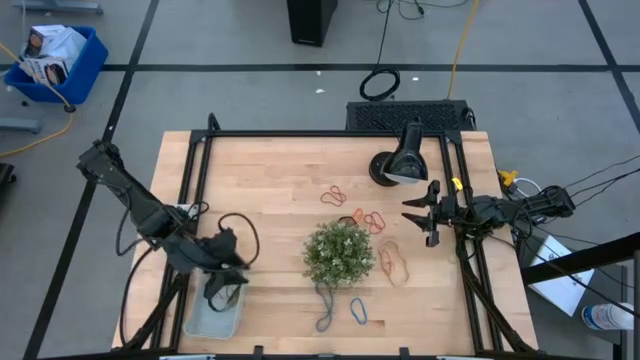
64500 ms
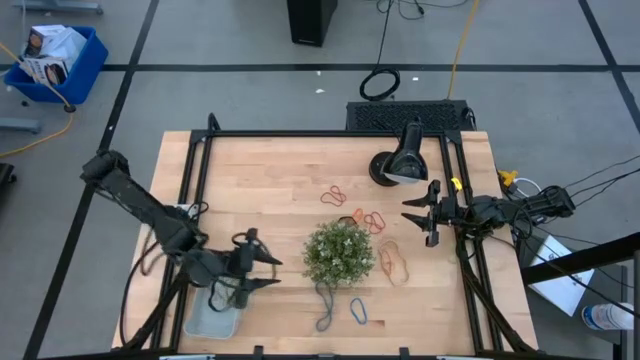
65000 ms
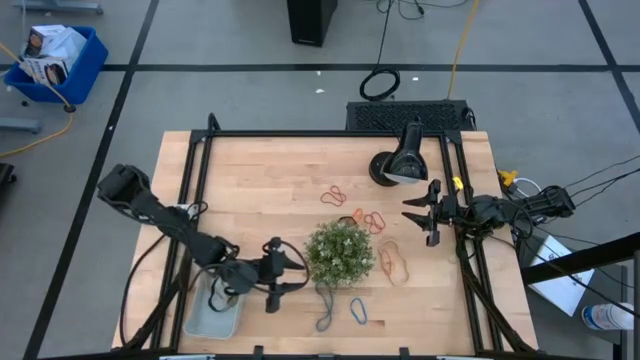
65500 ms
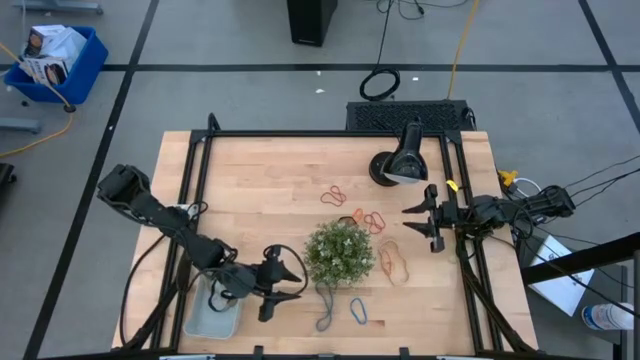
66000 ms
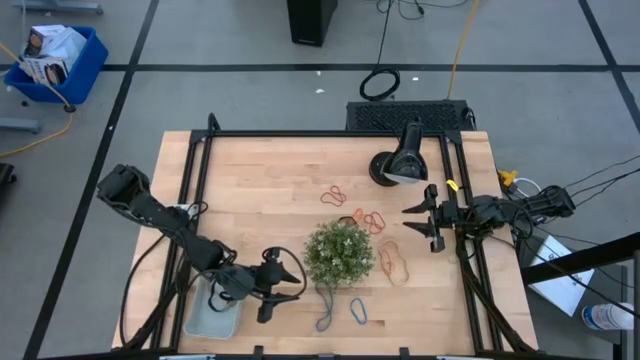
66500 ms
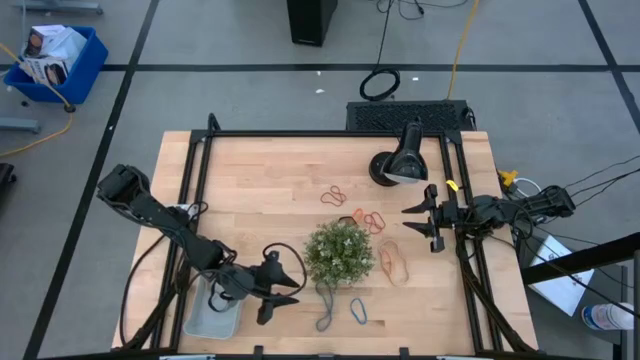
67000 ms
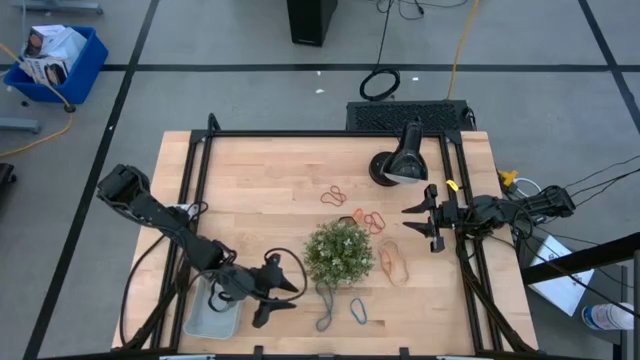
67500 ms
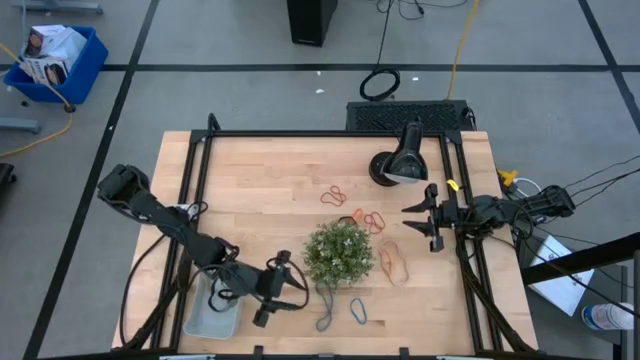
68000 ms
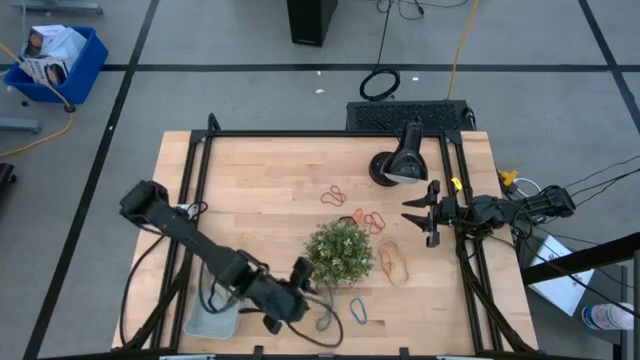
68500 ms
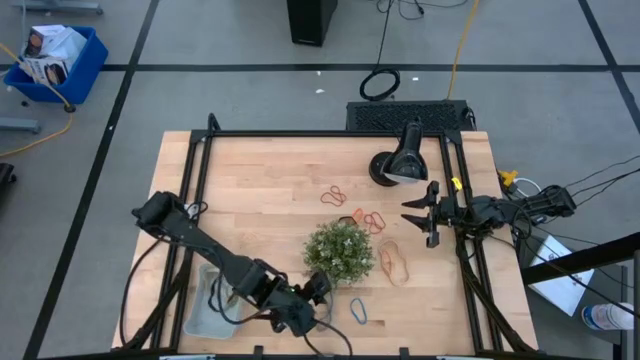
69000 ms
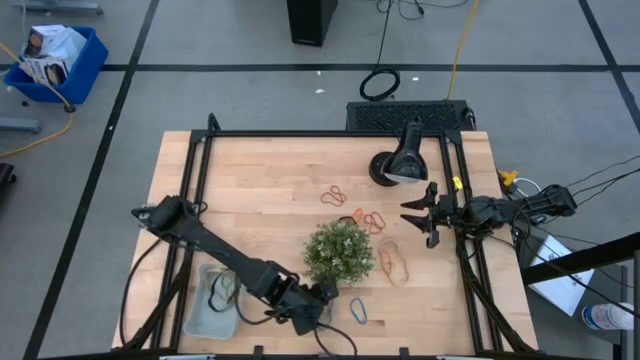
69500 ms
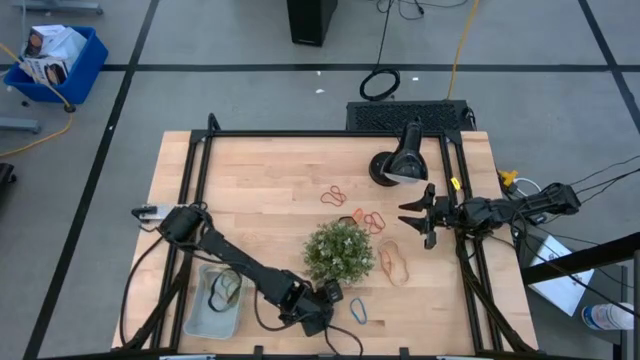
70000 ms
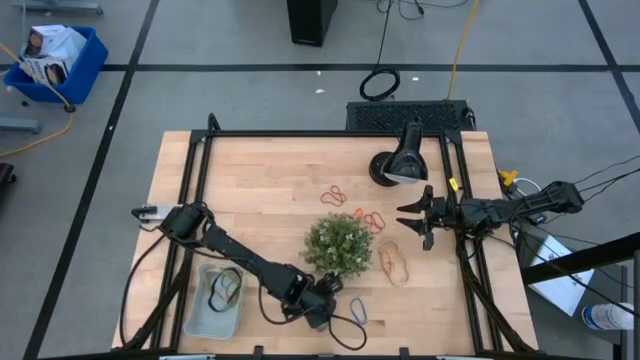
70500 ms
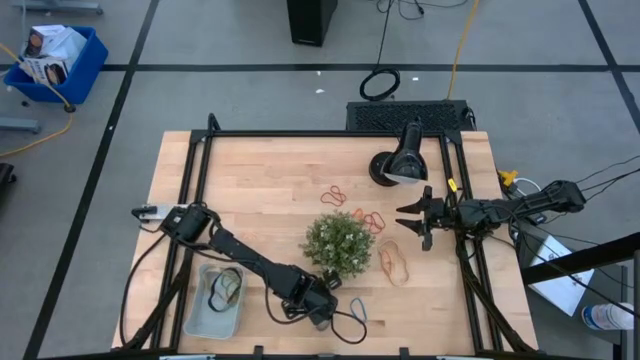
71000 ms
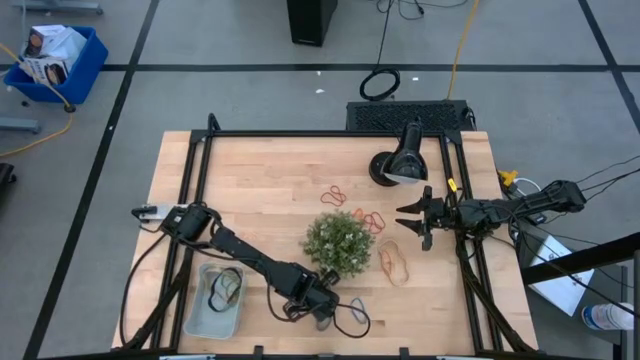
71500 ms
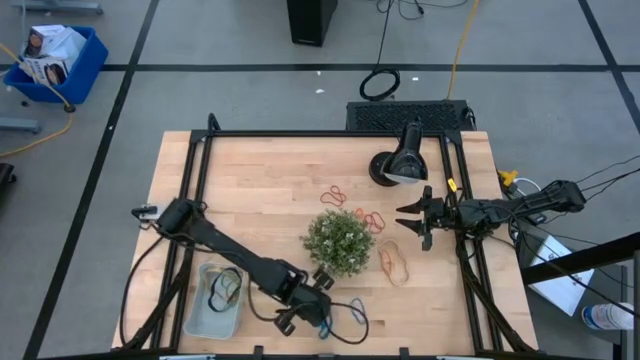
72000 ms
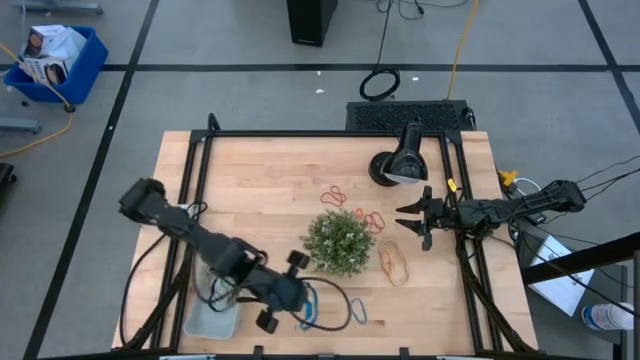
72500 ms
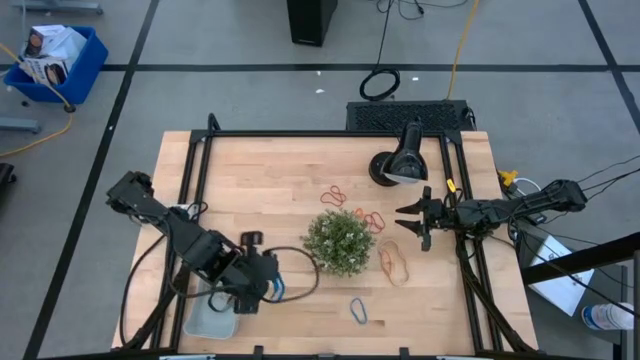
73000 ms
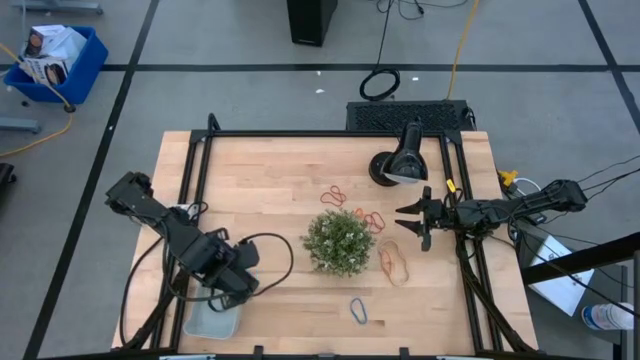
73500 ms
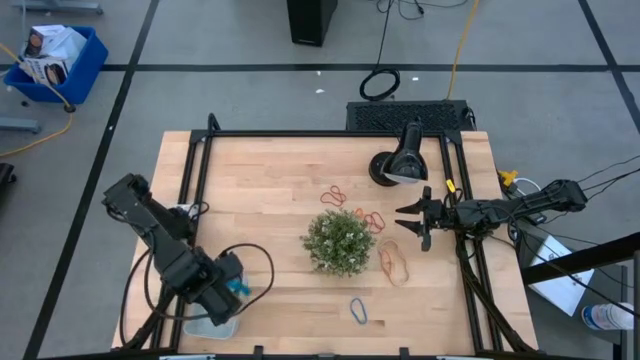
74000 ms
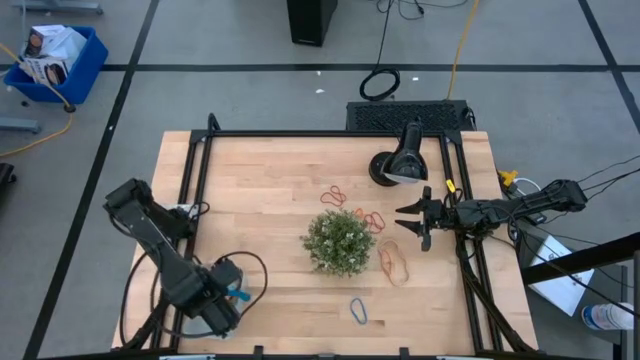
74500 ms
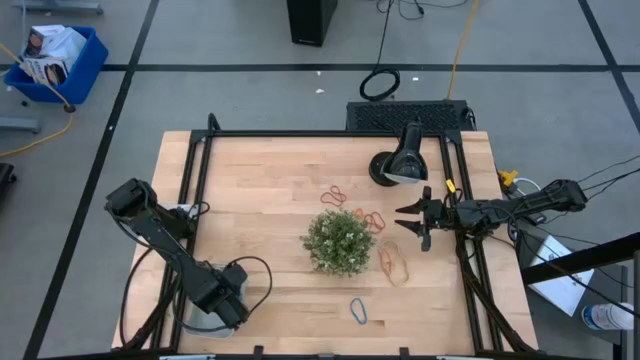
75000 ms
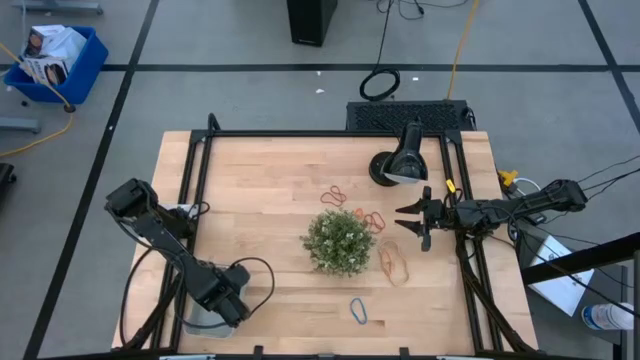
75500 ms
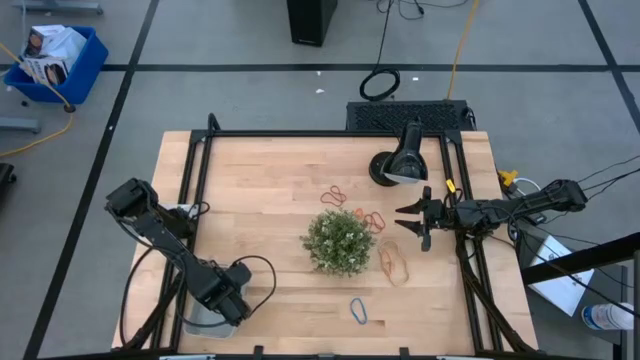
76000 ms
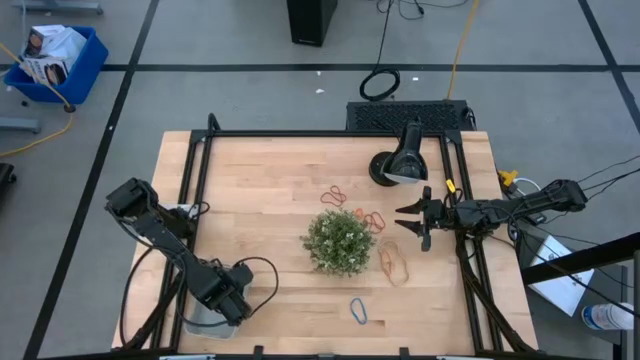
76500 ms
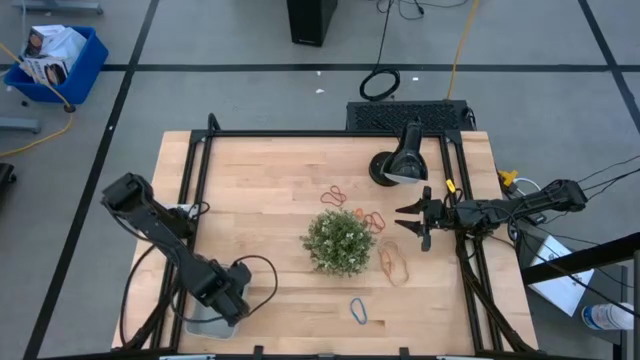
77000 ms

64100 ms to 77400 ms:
Task: Pick and place rubber bands into bin
Put the left blue rubber band into the blue bin

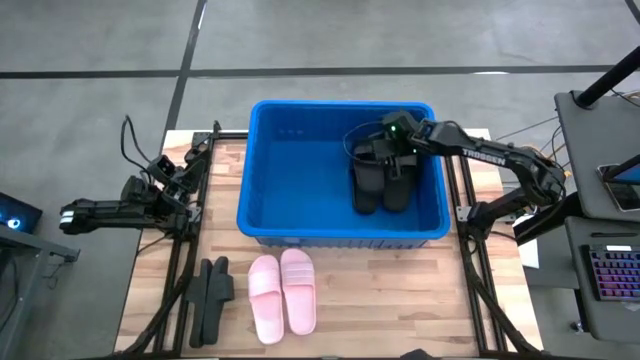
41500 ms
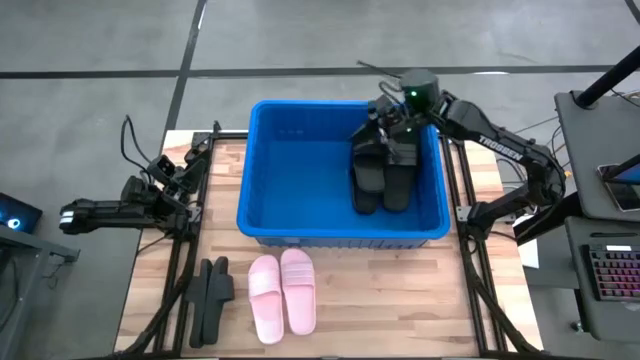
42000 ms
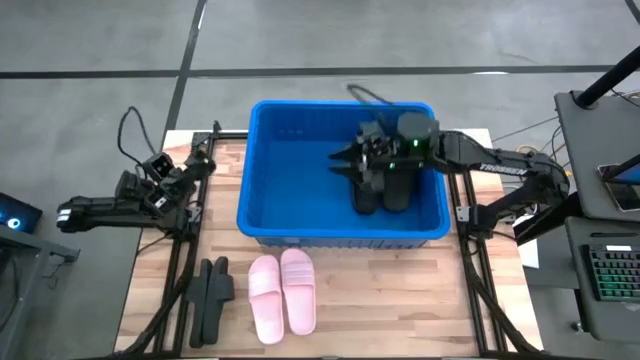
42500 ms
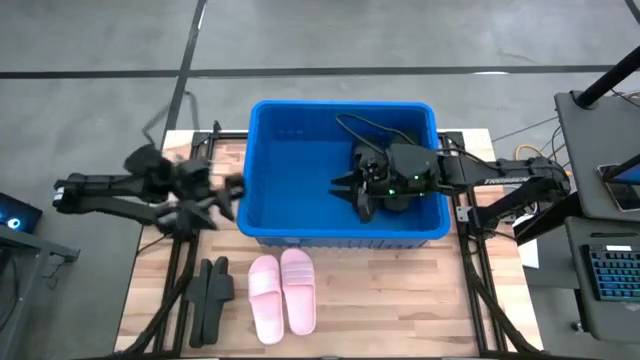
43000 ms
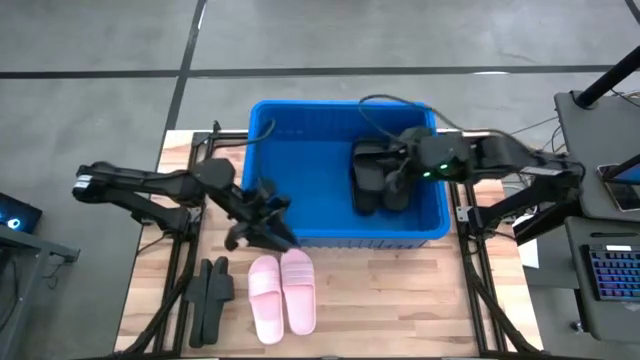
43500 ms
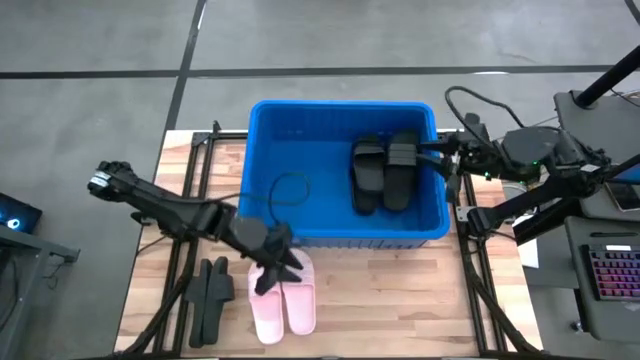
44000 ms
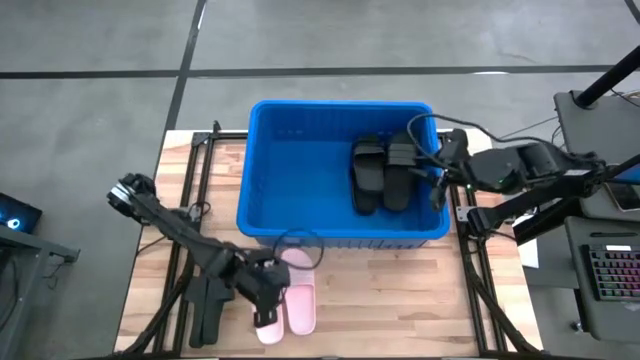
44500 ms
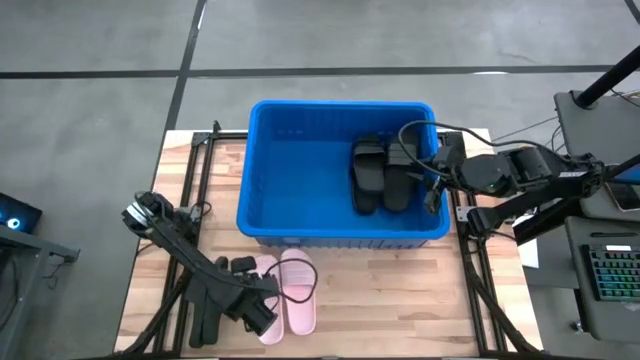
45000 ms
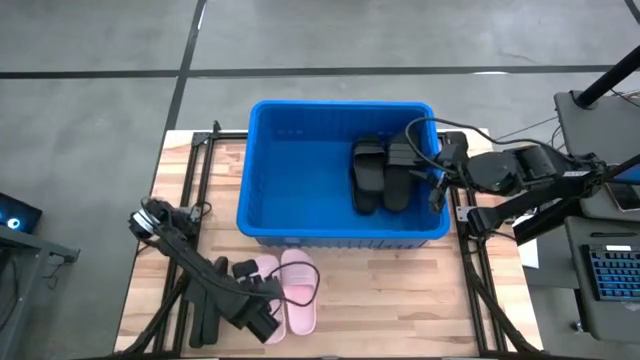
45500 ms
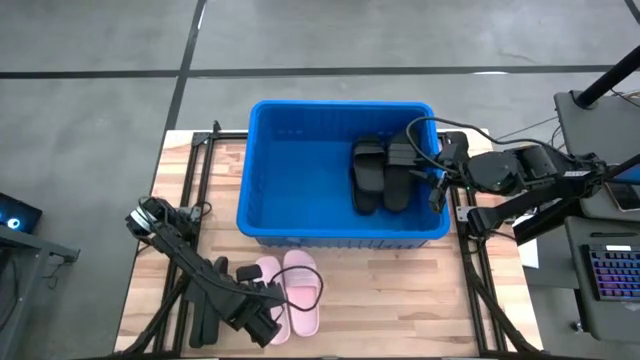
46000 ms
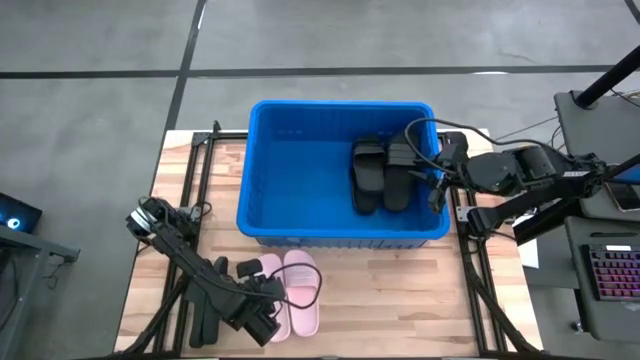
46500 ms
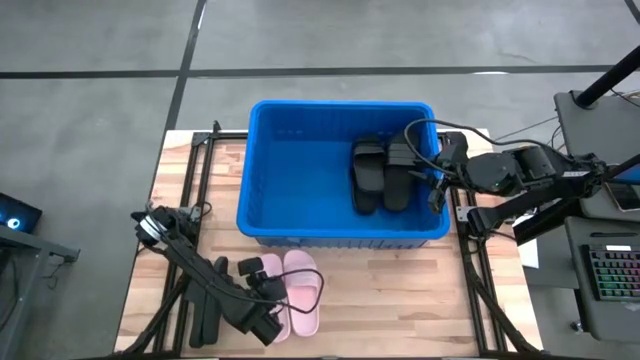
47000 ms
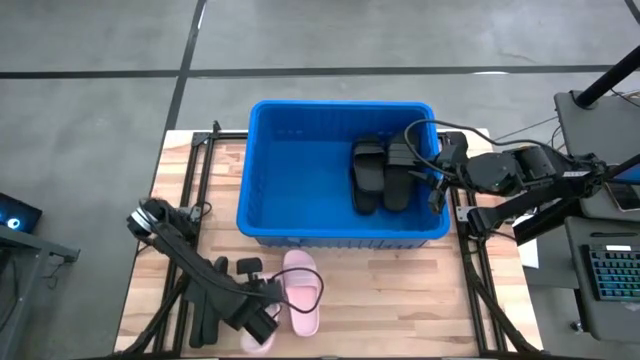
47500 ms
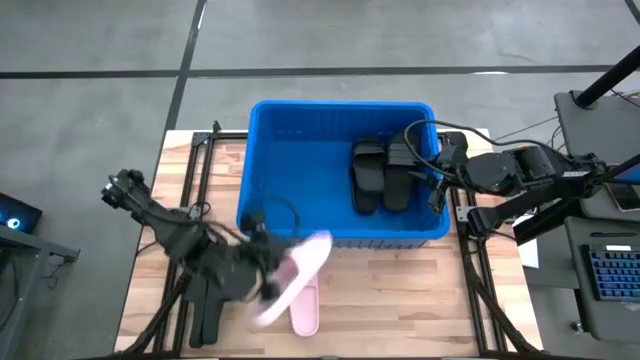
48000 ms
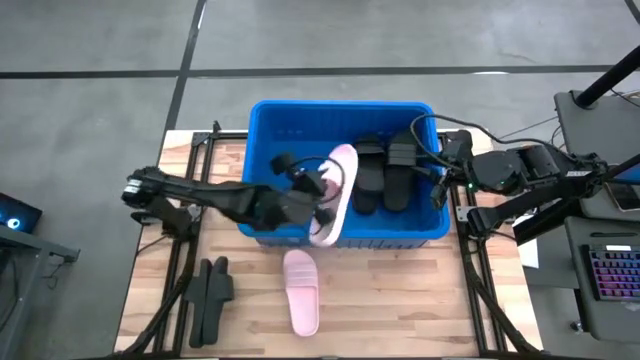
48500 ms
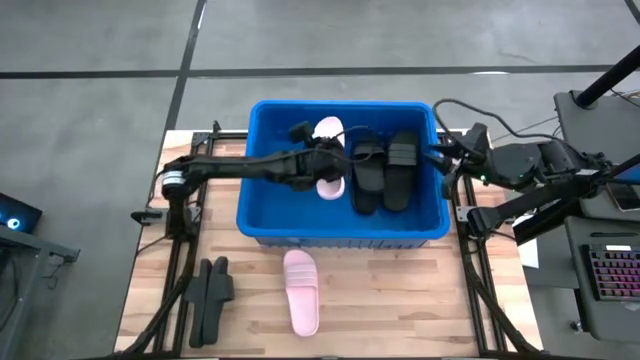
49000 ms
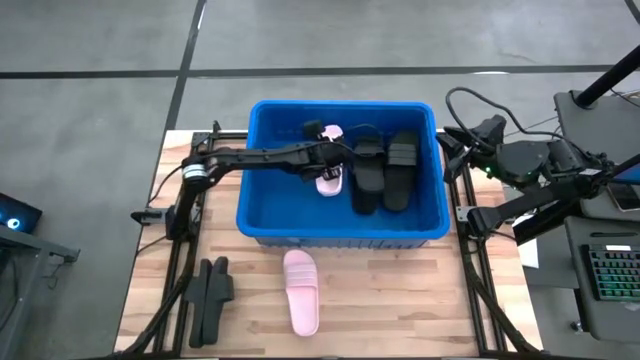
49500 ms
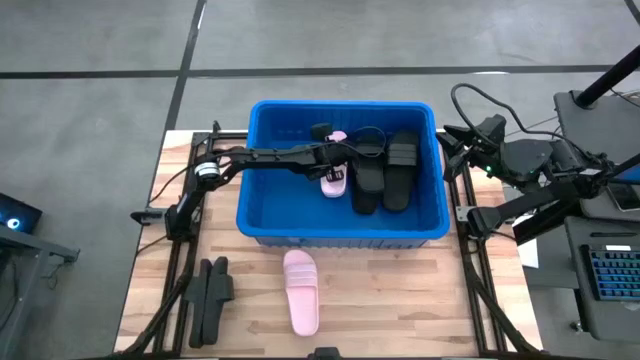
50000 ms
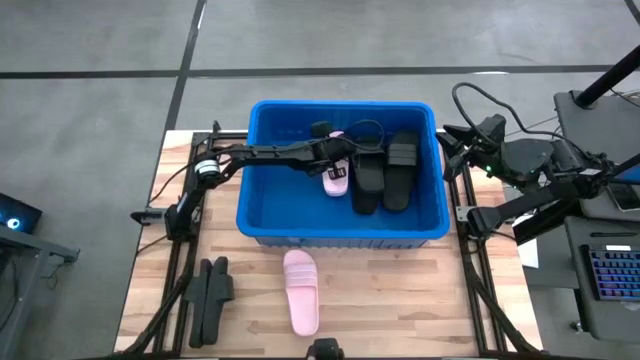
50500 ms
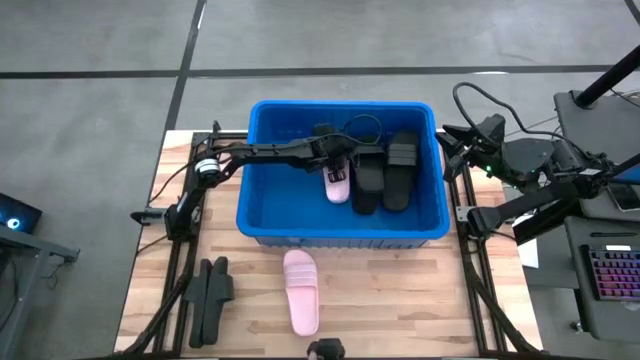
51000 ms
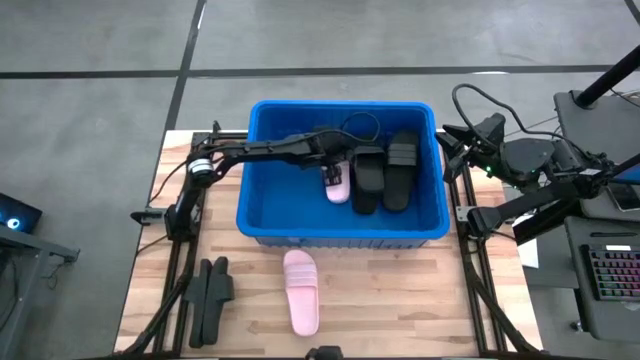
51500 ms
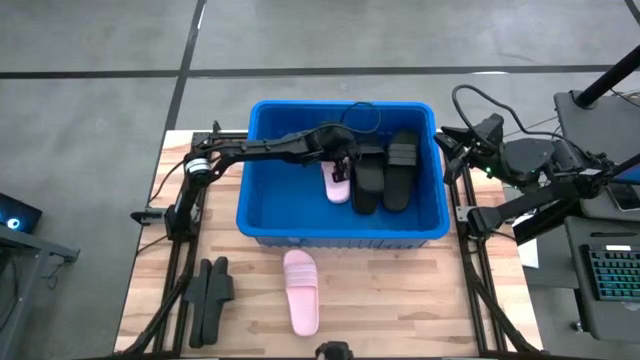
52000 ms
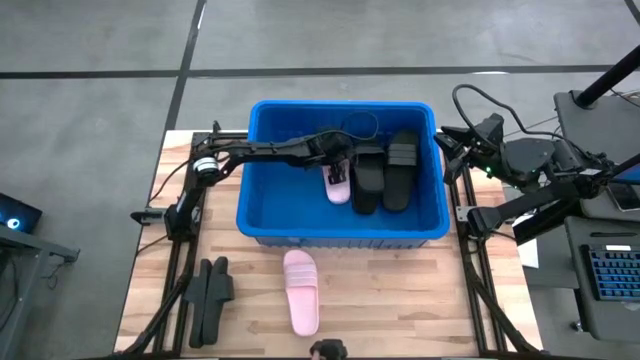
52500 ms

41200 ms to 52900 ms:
Task: Pick and place slides into bin
Put the pink slipper into the blue bin
